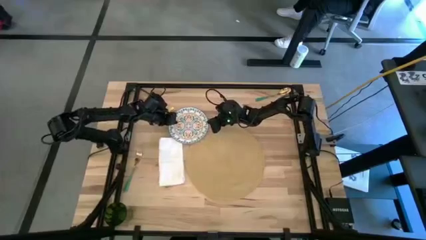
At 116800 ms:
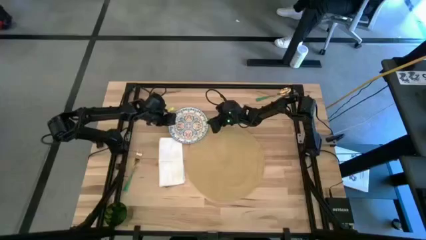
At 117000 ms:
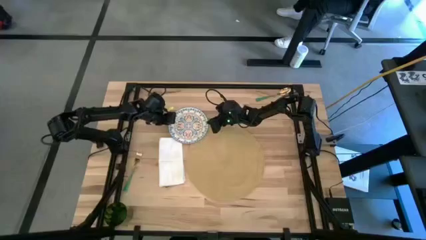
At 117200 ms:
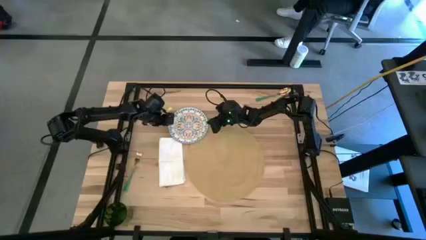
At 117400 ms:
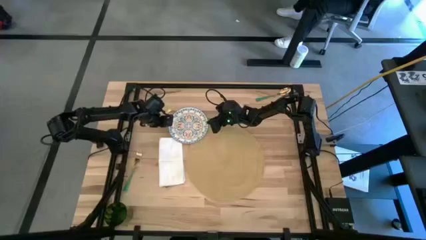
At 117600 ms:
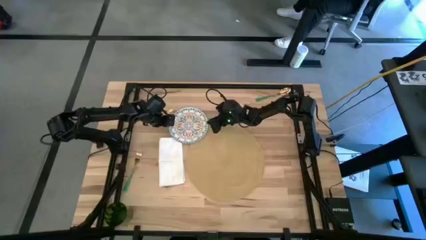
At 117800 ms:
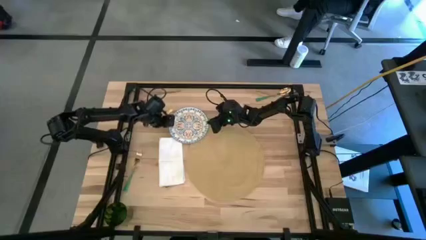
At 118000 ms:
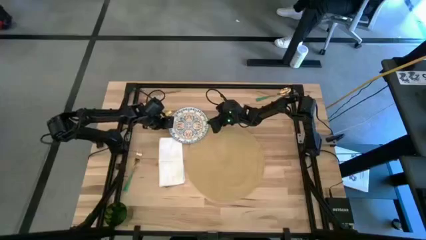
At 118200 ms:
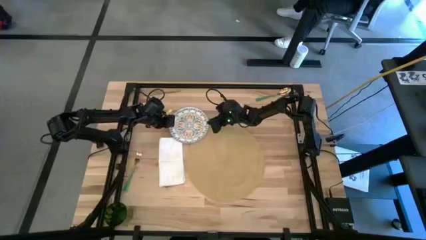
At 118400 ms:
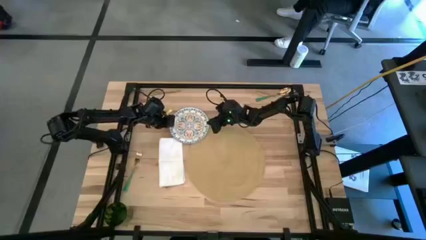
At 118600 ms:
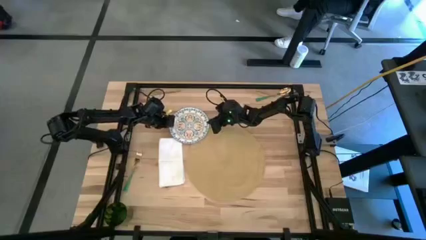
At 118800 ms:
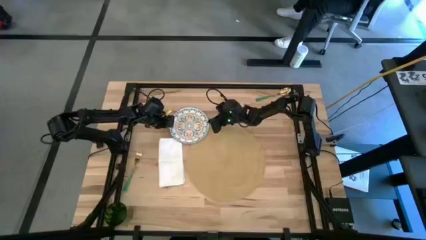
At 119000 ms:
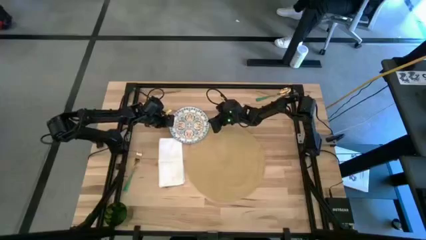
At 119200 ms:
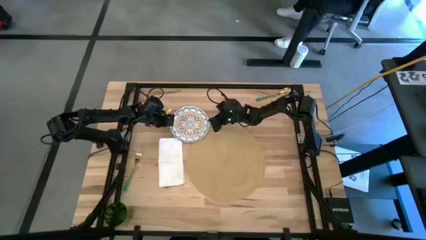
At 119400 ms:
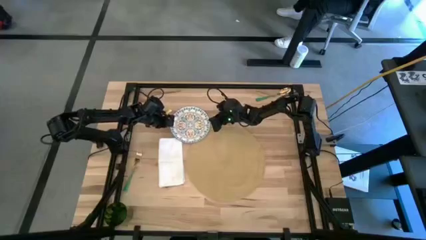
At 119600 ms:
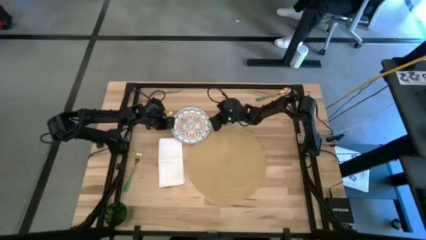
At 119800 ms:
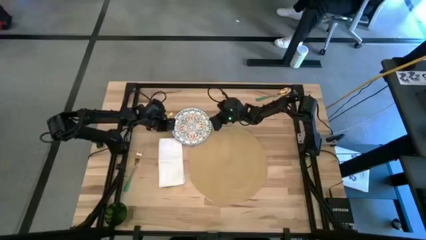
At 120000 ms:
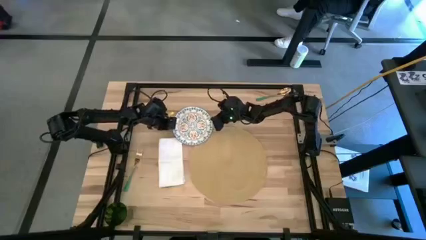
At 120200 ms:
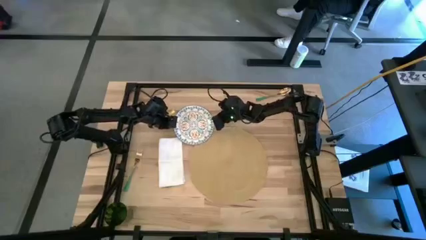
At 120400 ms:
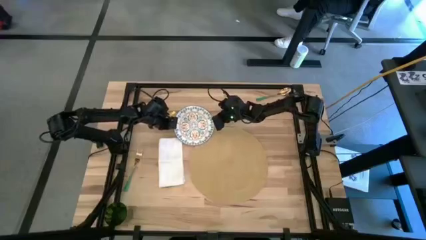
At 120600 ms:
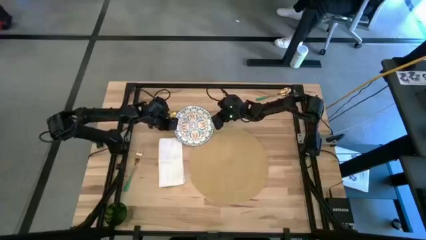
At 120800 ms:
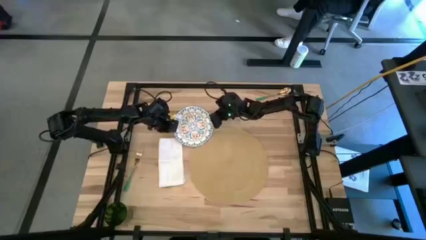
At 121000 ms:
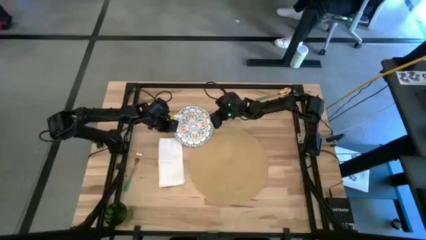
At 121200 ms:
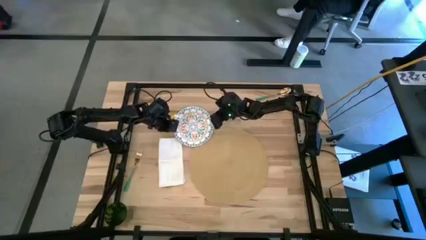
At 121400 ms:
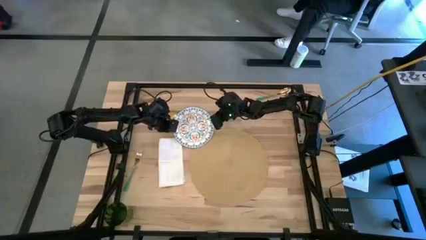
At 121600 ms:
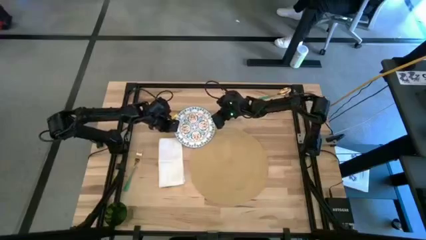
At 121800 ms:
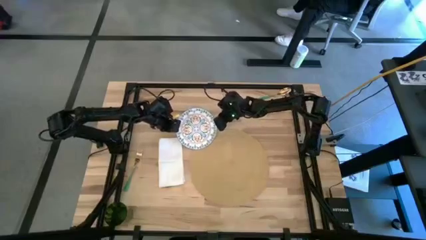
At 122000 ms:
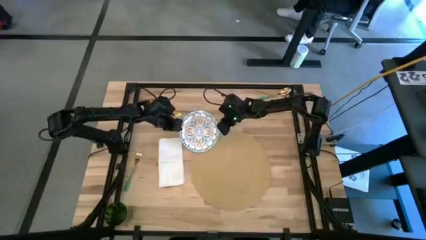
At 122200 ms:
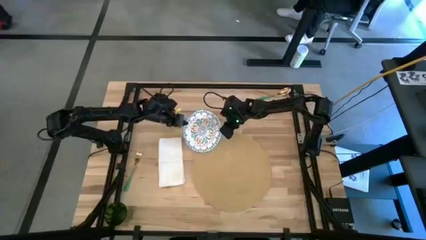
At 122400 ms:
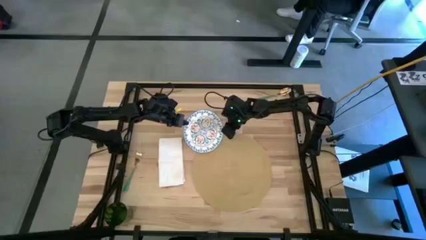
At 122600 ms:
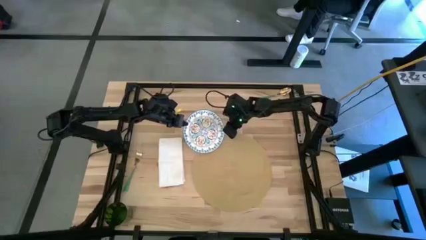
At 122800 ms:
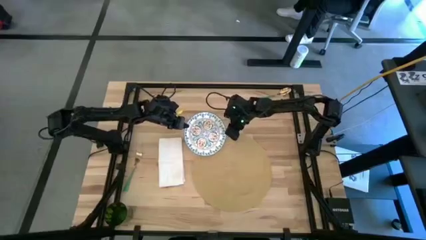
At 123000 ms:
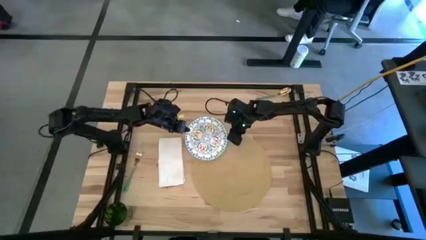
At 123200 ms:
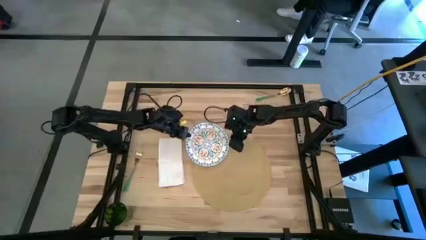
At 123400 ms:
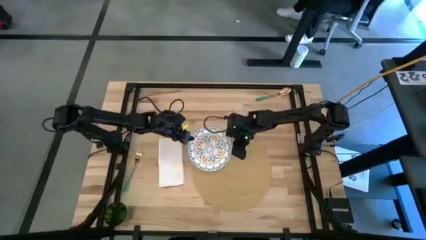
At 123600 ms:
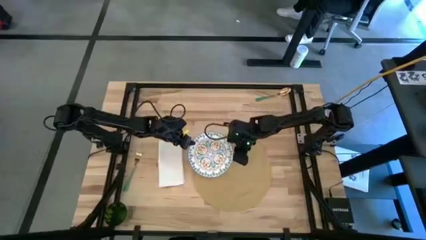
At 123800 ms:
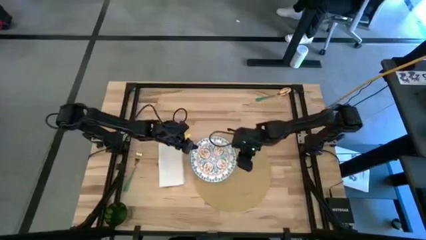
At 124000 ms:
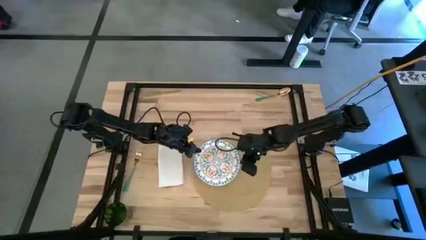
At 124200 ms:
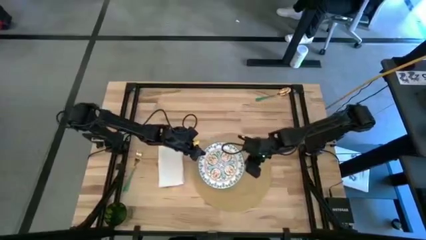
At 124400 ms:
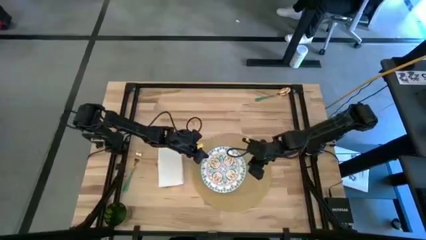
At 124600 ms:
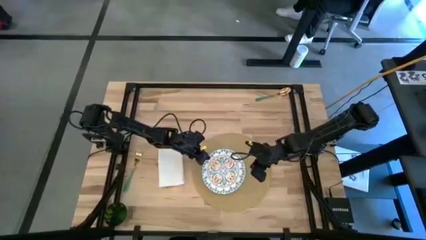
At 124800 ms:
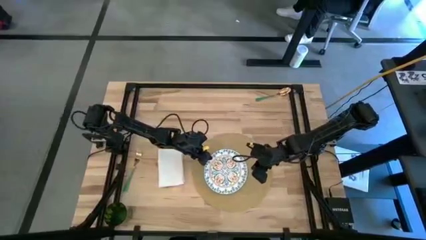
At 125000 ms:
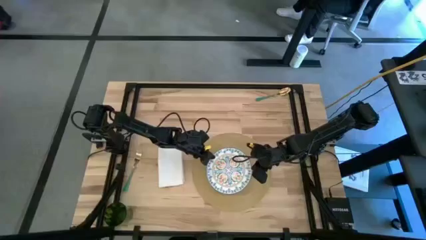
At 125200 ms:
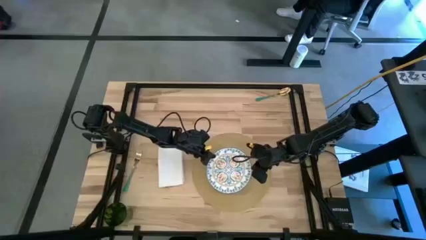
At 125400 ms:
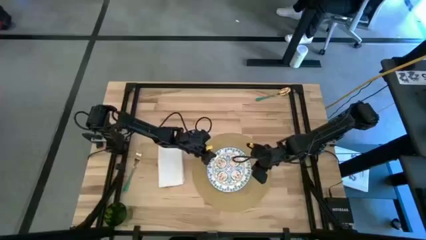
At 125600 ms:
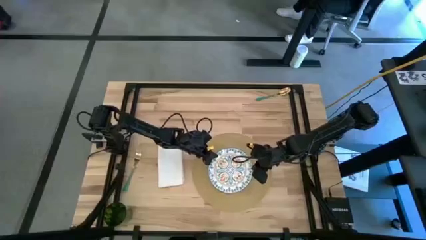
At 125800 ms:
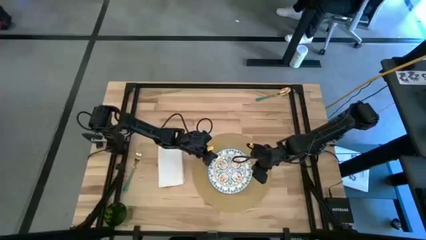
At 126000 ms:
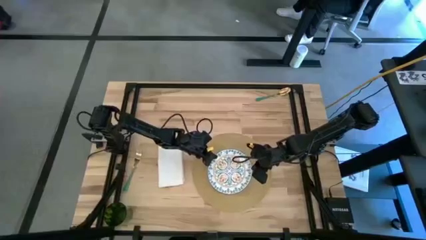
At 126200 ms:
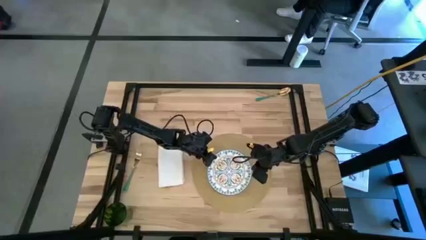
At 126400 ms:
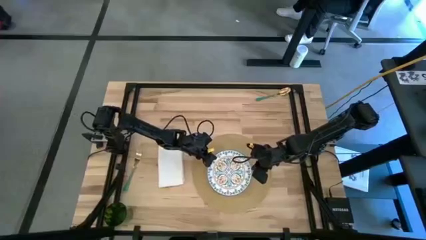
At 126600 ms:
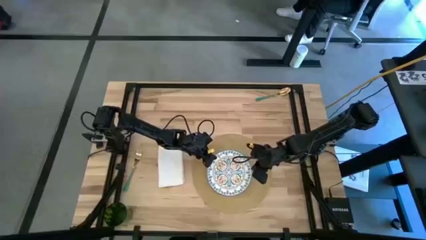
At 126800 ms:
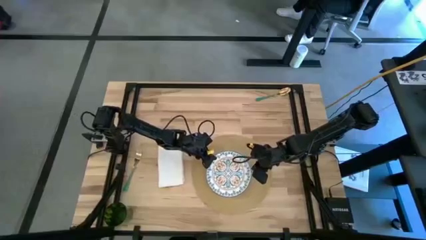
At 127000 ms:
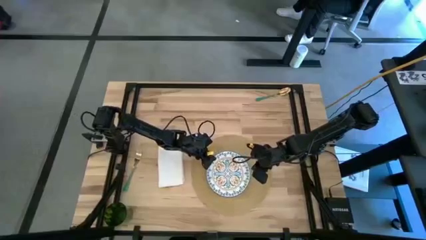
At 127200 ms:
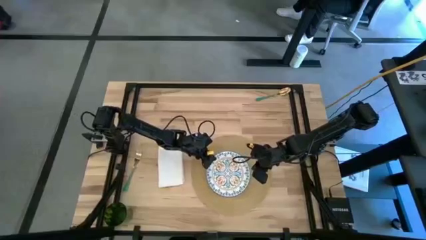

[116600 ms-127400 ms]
Task: Set table place
Put the blue patterned plate on the brown place mat

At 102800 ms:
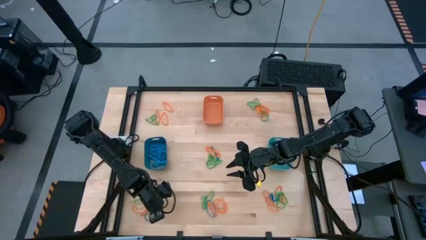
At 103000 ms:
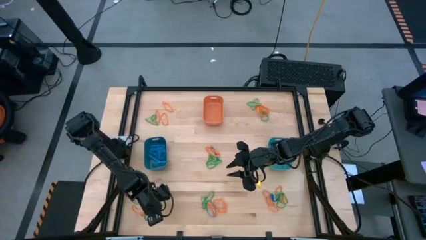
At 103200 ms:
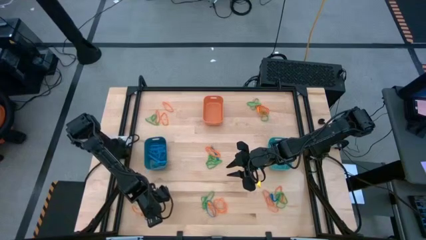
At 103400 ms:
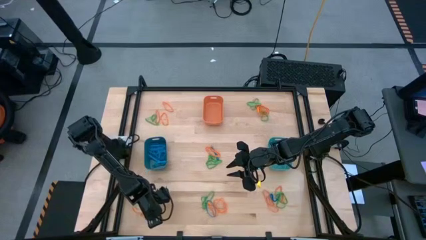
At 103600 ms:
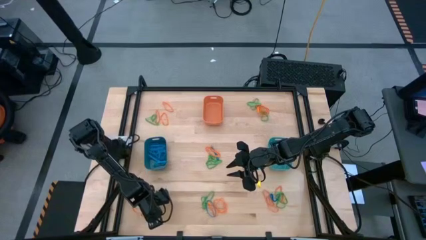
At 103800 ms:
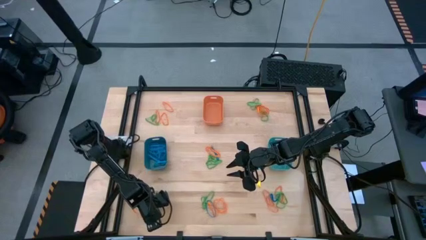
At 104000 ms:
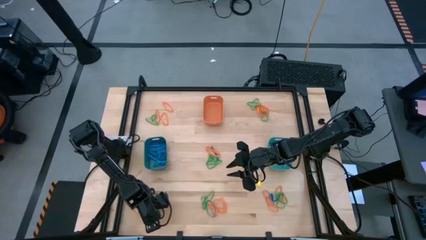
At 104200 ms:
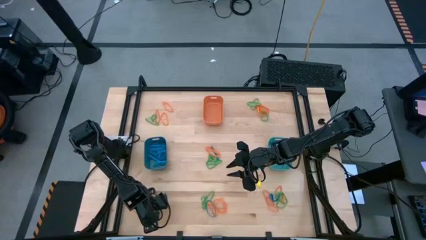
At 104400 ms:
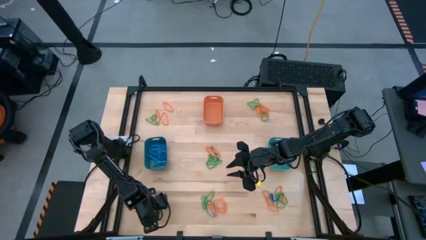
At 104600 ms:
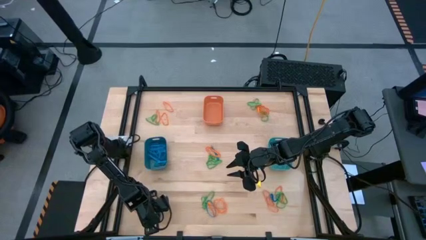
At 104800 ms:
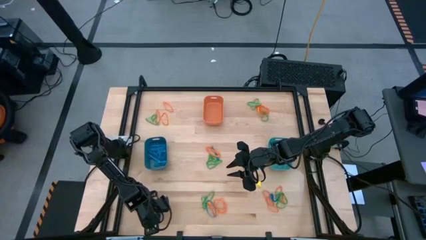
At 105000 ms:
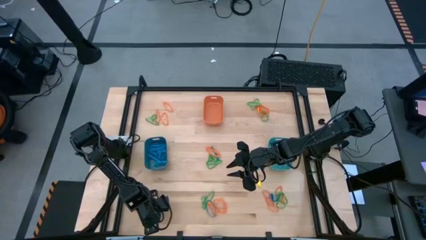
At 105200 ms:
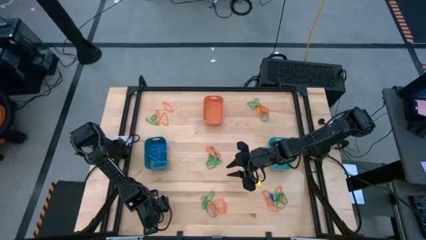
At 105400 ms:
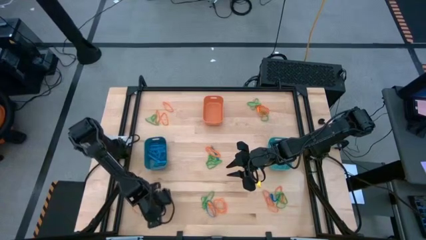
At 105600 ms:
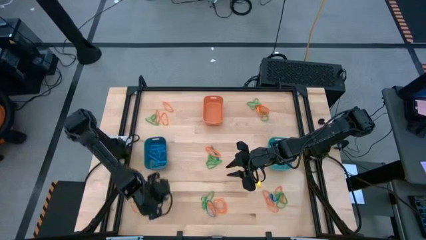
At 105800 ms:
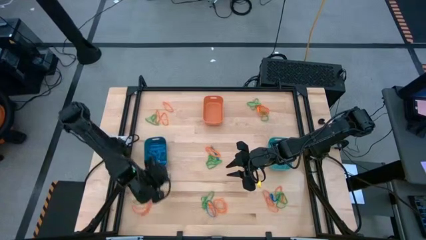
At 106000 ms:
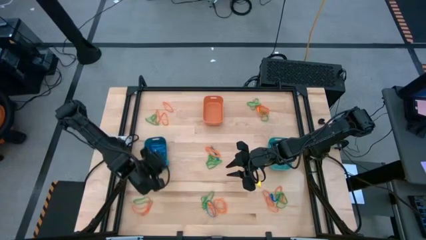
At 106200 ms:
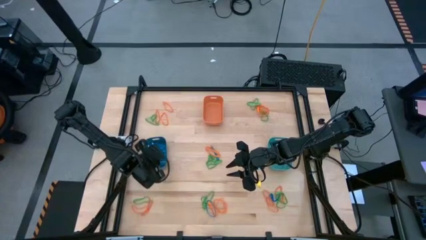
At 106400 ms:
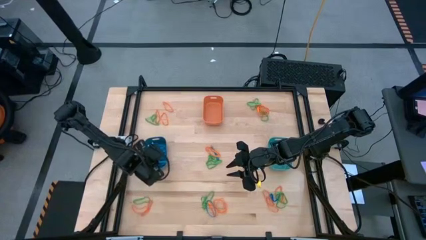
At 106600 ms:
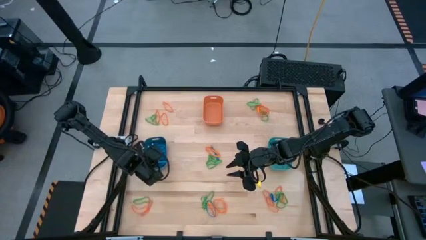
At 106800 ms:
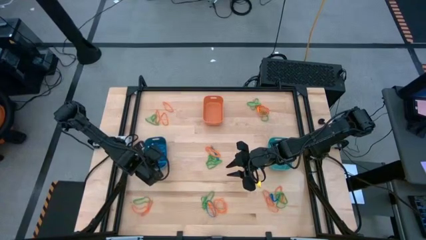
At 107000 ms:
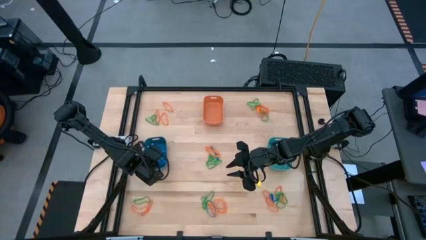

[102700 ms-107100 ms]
Task: Sort rubber bands into baskets
Put the blue rubber band into the blue bin
